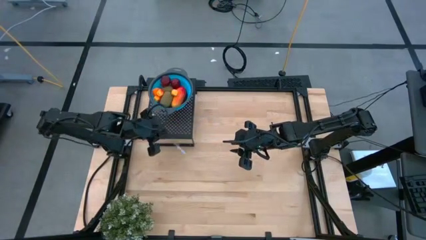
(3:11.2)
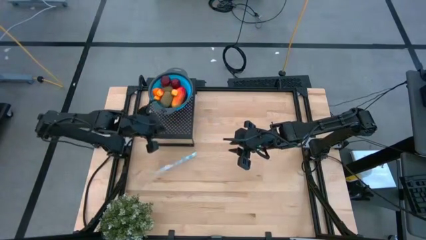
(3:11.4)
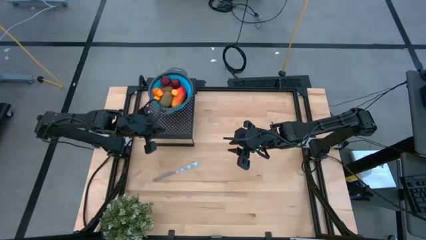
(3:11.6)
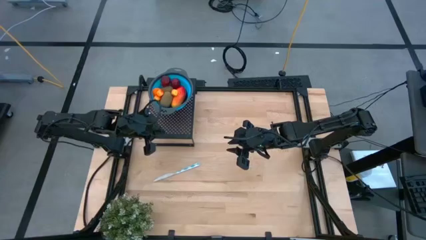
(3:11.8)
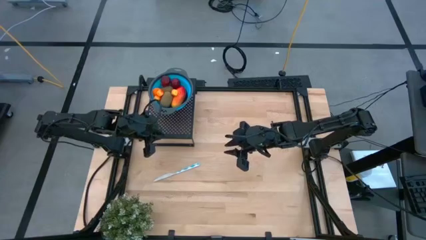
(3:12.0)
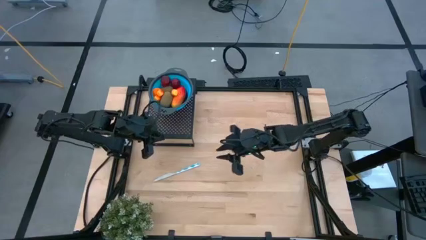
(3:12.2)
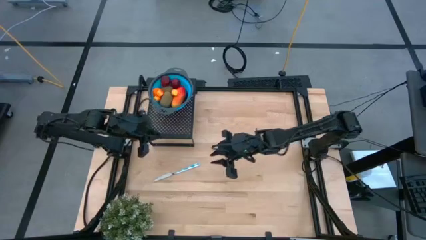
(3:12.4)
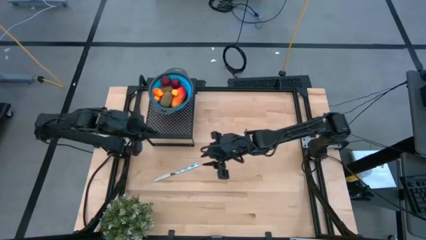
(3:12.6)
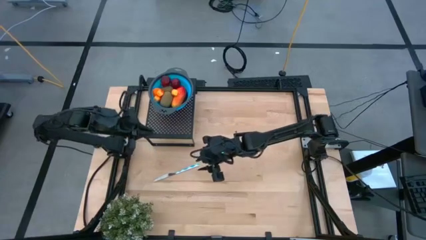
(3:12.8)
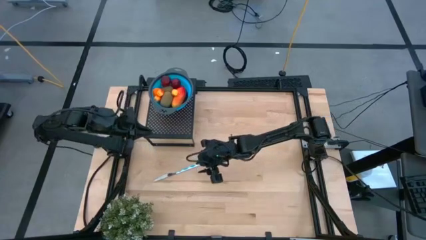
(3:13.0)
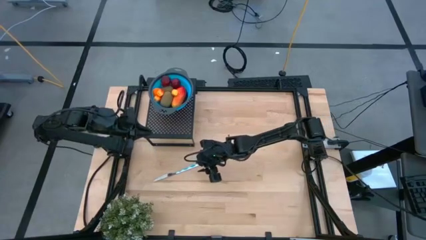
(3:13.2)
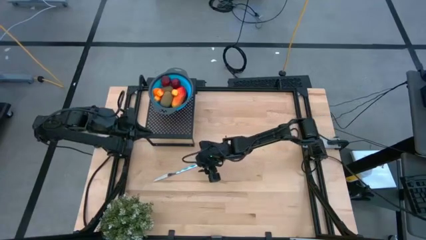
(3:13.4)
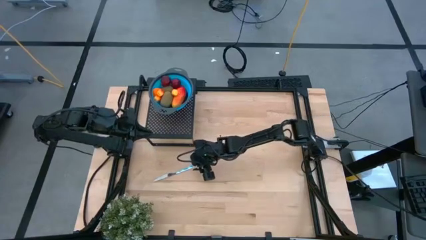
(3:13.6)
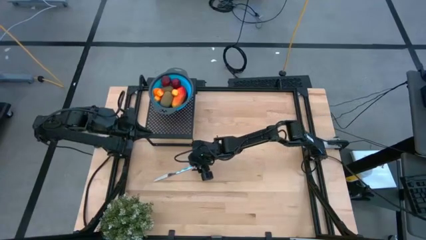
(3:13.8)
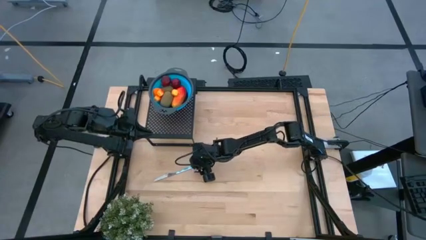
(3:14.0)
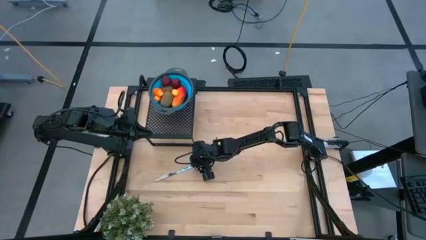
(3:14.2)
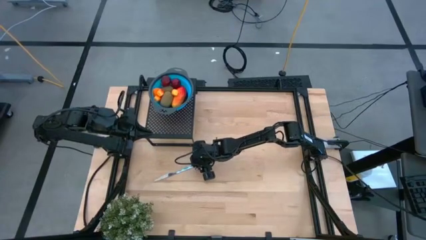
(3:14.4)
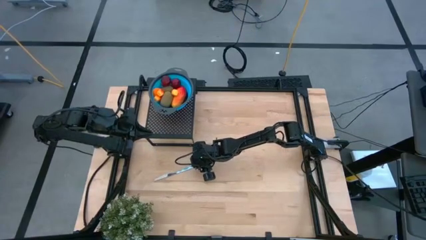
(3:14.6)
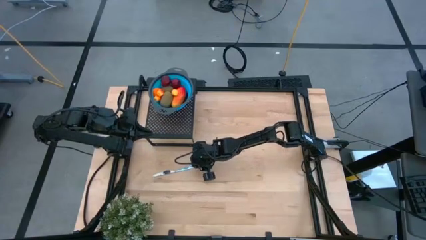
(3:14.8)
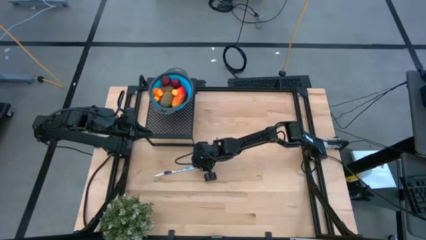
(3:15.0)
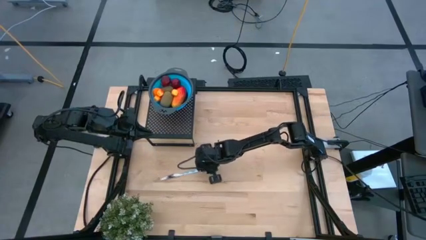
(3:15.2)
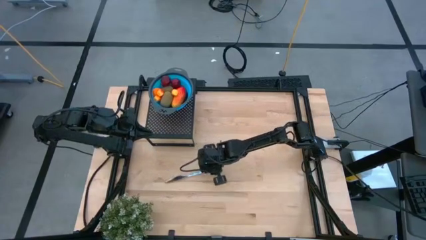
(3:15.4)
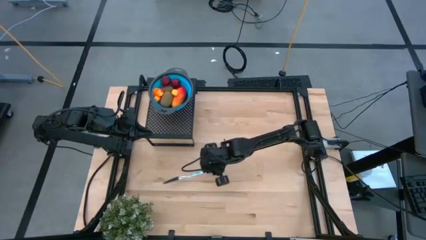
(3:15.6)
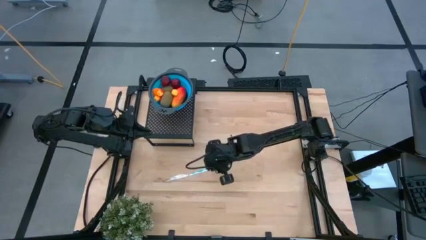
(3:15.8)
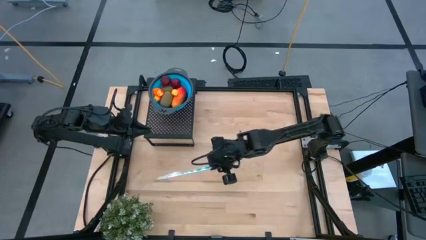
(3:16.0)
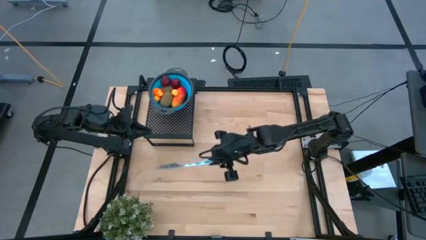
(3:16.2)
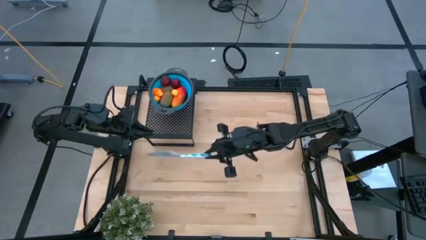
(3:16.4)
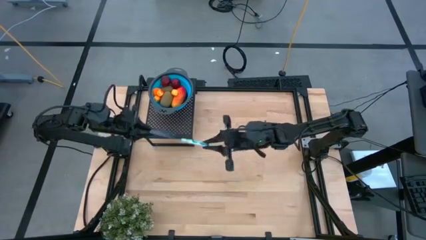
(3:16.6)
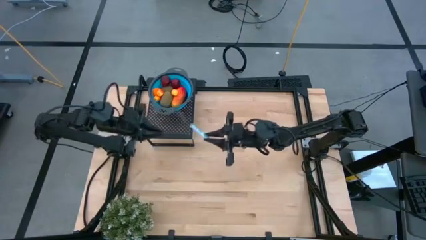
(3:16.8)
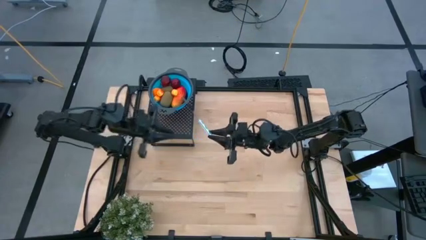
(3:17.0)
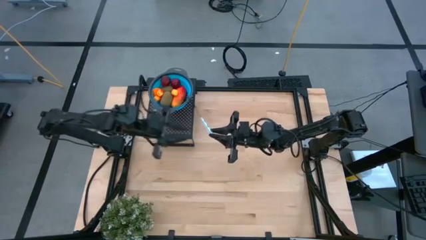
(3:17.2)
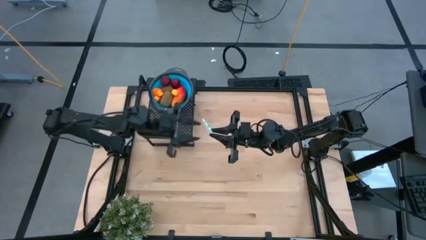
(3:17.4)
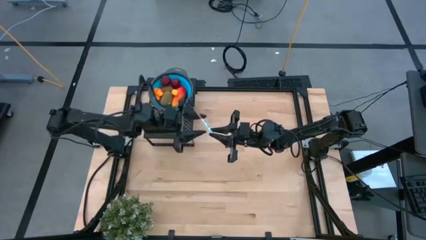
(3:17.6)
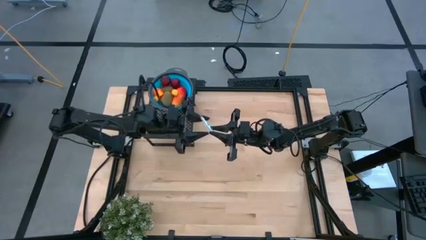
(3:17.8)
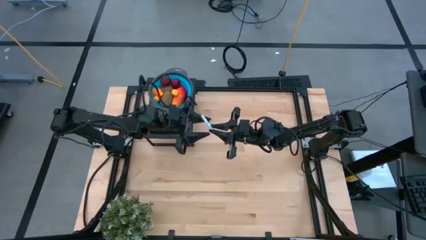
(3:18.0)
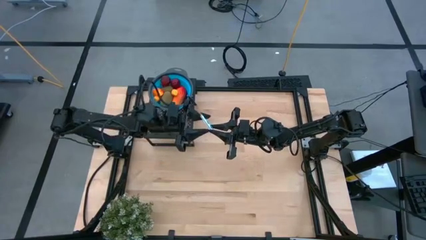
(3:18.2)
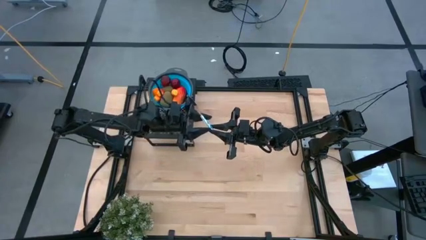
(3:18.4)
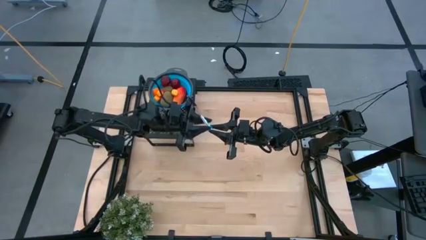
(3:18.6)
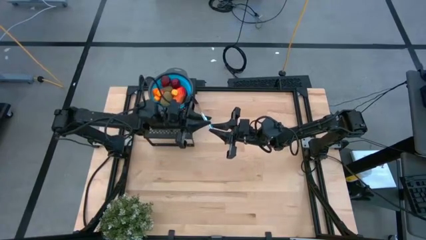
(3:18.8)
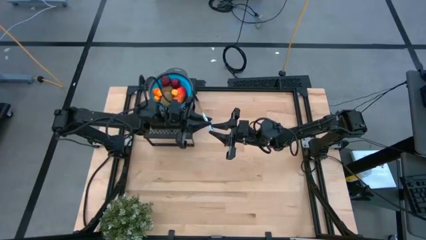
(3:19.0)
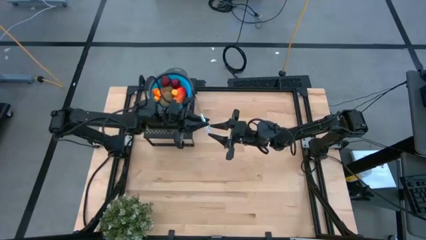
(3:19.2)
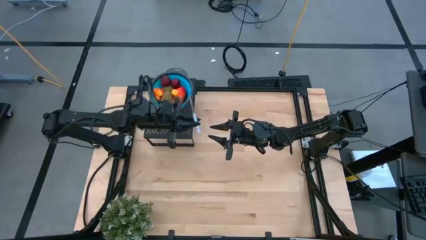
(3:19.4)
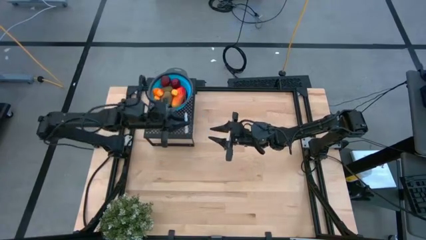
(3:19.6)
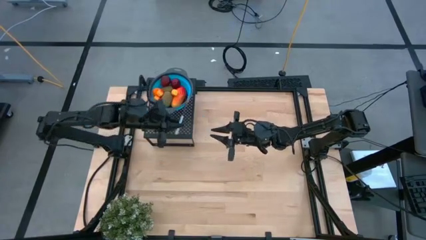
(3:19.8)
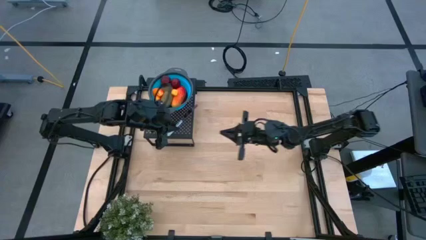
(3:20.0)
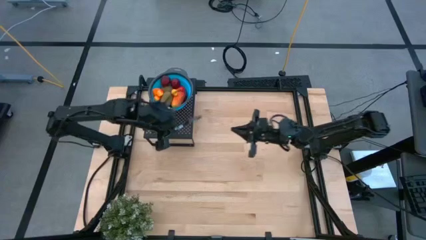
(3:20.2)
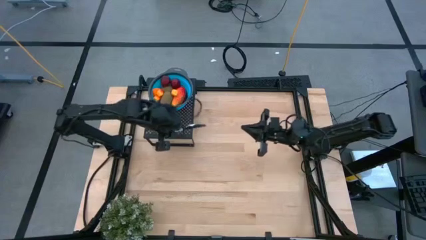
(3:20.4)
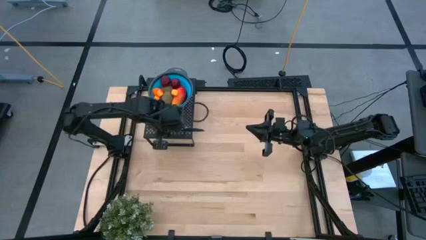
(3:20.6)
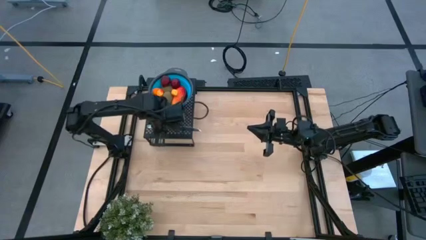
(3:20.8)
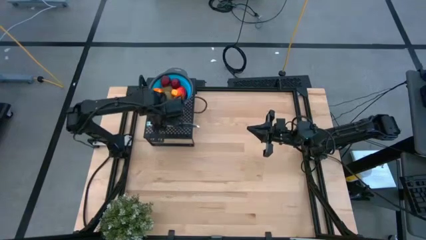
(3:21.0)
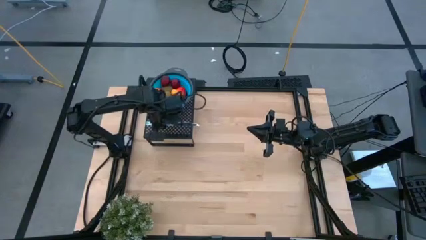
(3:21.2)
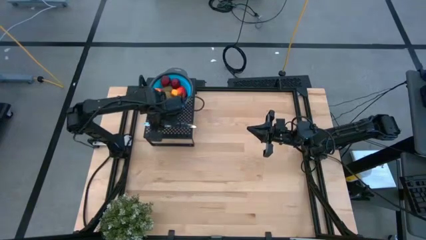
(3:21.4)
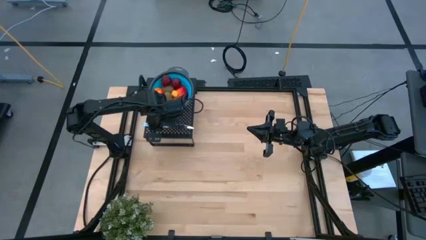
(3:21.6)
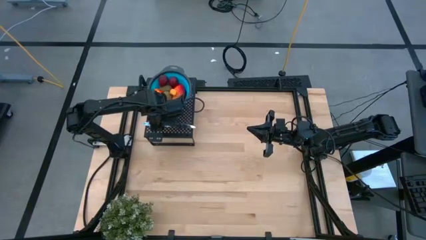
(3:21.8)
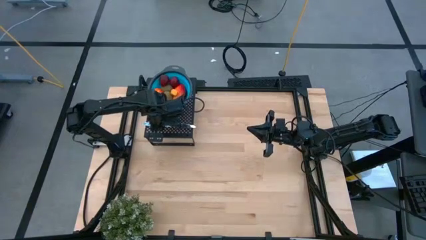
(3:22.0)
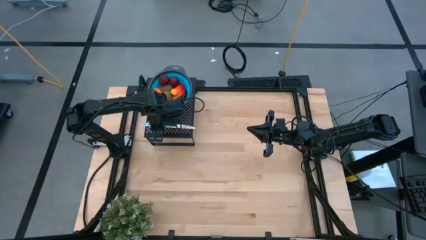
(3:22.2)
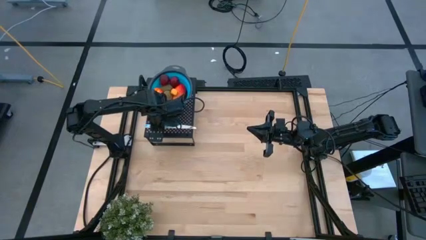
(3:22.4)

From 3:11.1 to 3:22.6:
Task: Pick & Place Fruit
Put the blue knife on the shelf

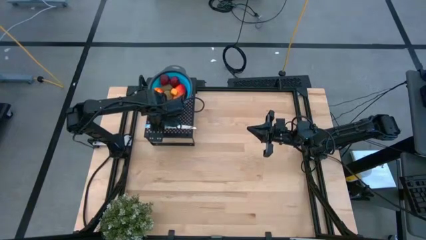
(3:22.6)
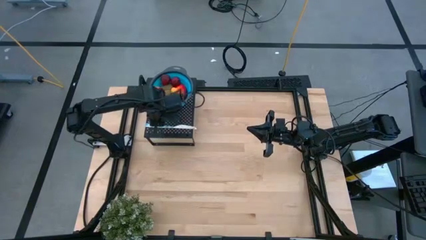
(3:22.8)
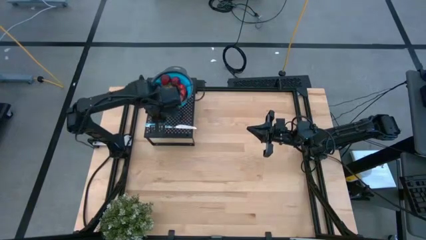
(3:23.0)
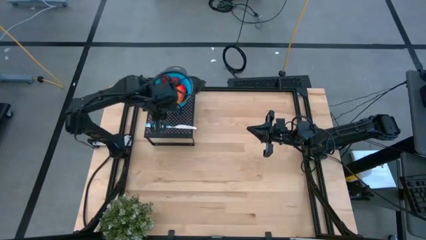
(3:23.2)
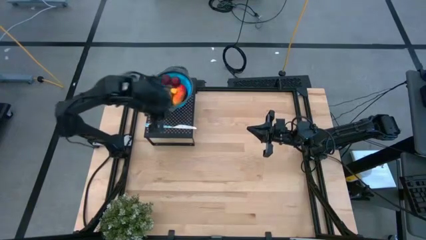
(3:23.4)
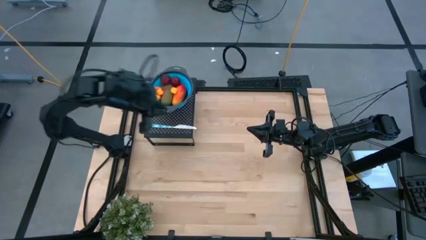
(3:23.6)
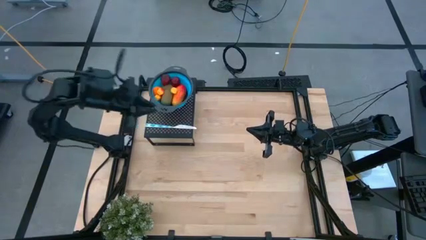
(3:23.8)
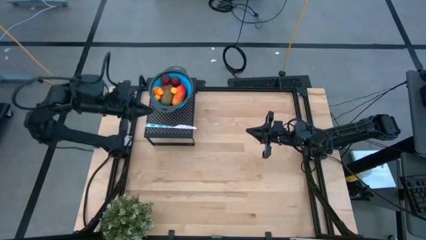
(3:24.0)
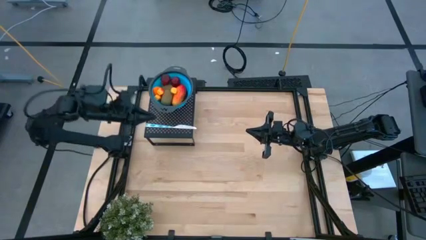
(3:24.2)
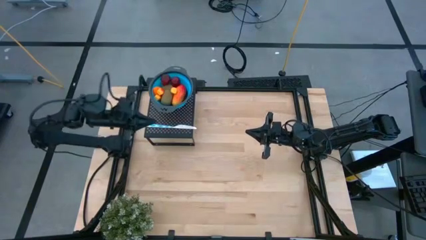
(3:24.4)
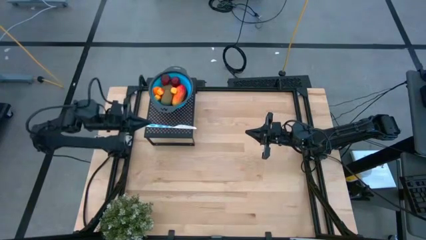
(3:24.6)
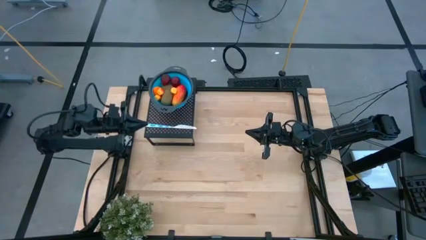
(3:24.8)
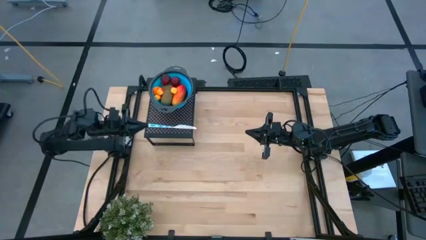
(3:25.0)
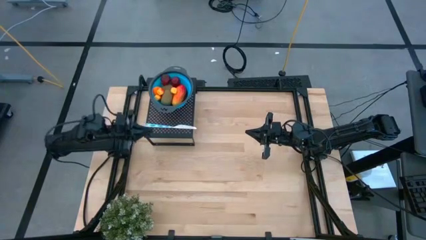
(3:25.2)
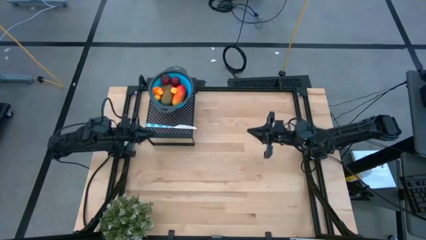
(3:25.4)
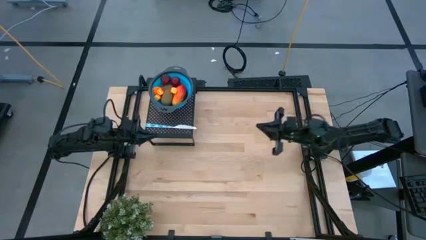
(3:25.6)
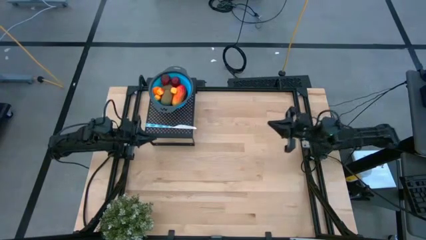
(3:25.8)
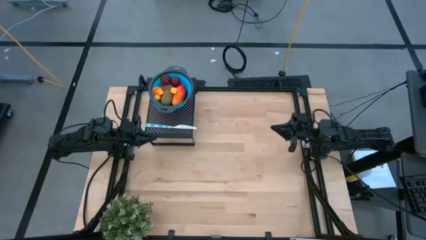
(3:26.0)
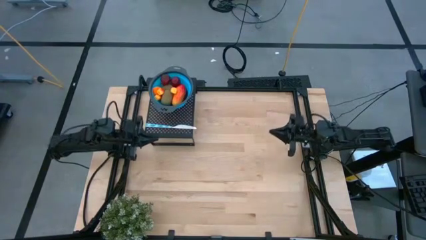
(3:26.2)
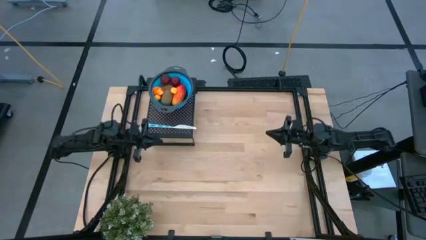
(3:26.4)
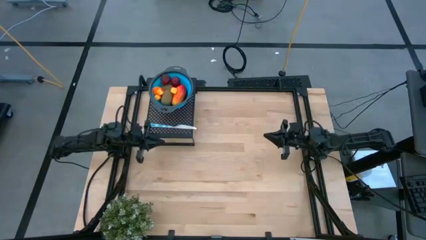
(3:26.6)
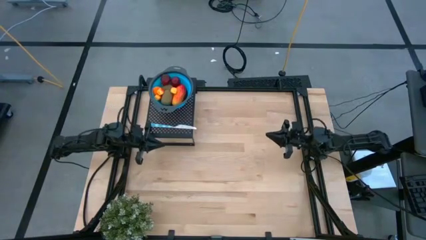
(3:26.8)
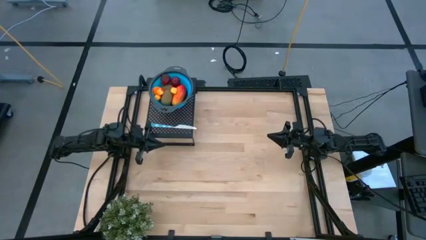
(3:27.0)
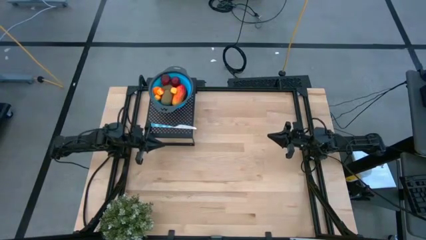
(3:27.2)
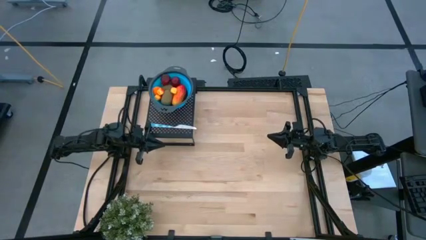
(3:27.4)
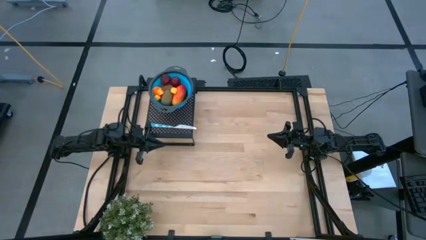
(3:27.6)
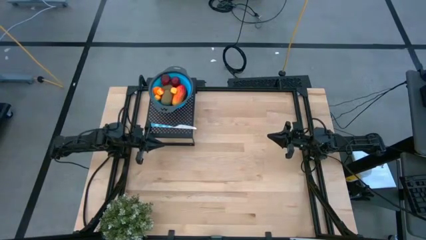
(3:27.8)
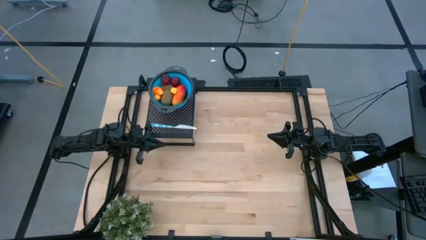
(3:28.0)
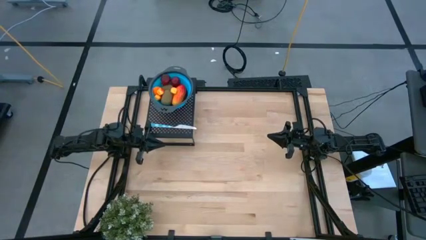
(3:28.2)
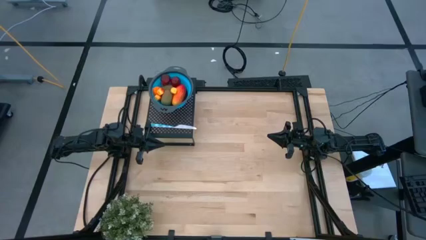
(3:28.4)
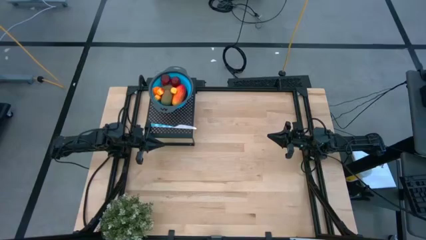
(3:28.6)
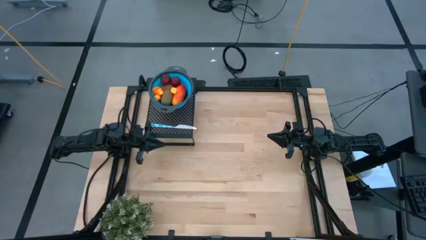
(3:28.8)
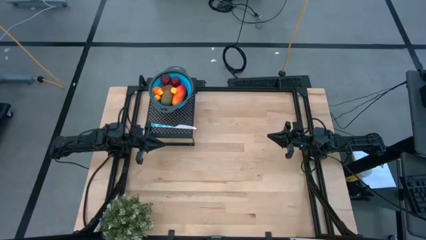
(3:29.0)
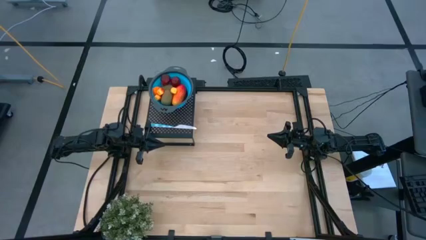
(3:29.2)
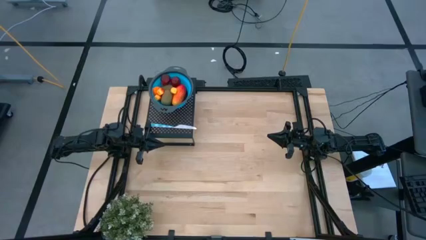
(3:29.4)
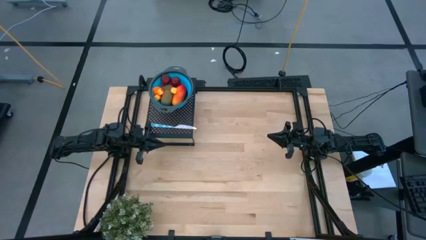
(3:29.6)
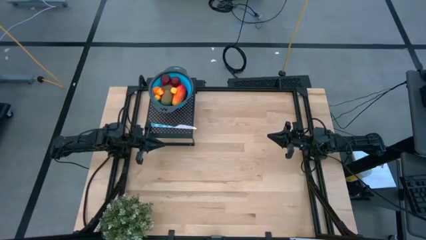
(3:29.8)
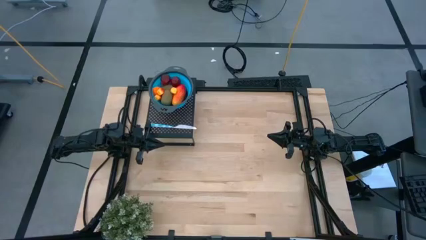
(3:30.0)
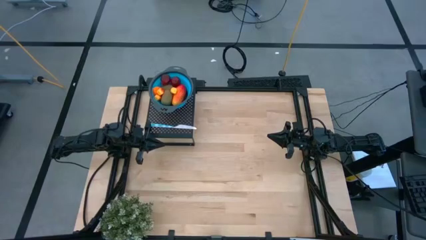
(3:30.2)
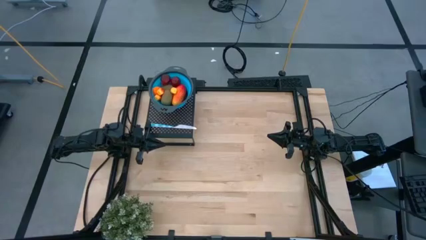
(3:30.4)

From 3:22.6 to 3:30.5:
Return to Home Position
